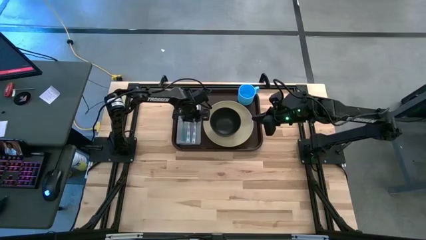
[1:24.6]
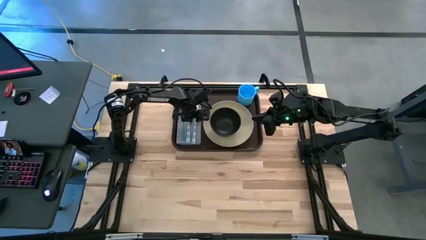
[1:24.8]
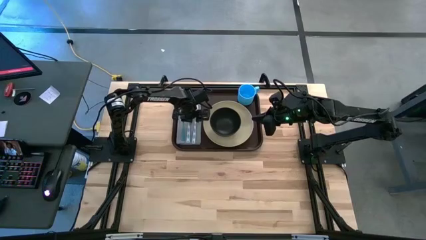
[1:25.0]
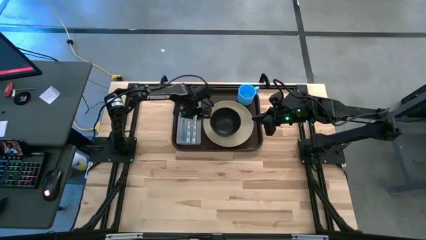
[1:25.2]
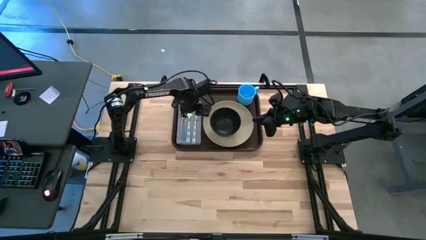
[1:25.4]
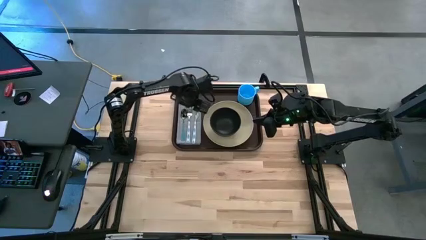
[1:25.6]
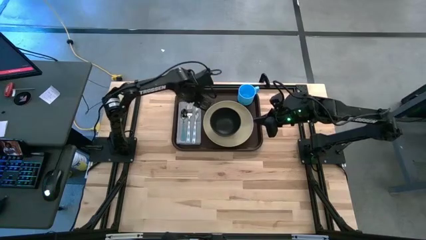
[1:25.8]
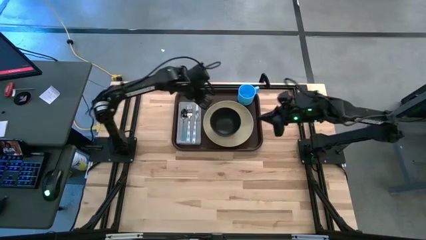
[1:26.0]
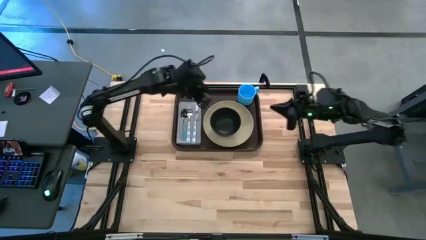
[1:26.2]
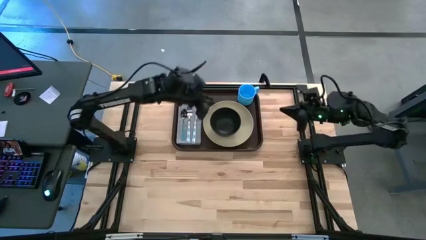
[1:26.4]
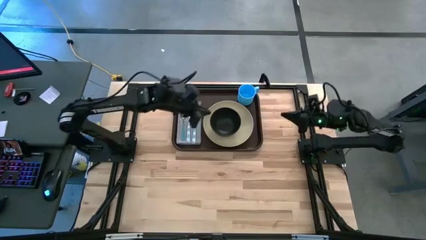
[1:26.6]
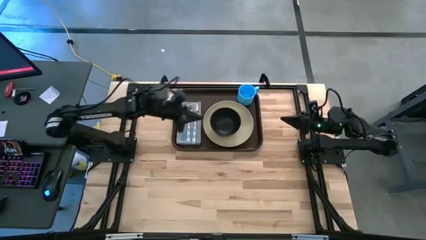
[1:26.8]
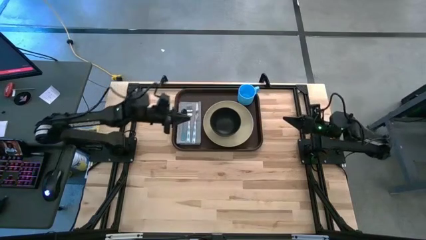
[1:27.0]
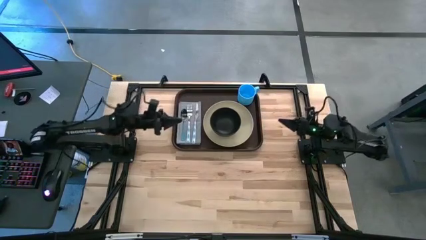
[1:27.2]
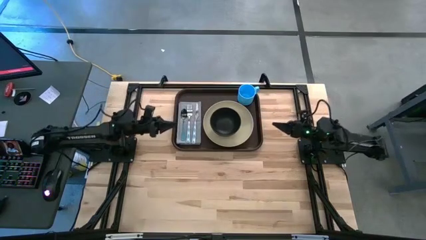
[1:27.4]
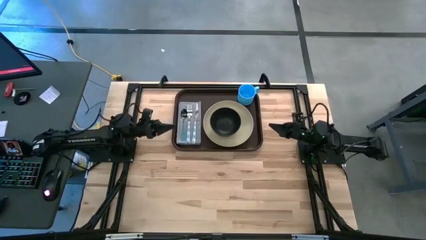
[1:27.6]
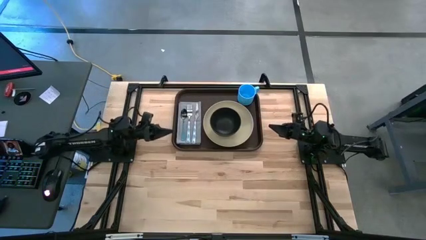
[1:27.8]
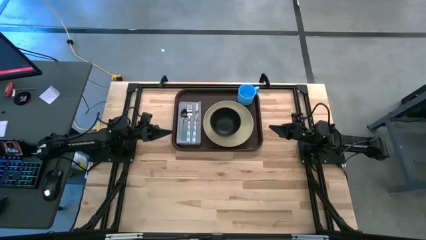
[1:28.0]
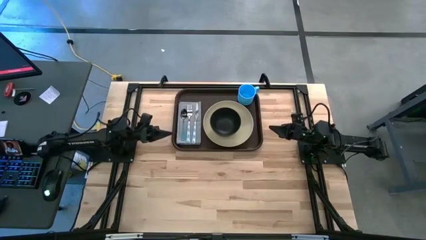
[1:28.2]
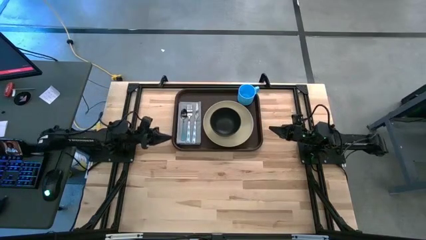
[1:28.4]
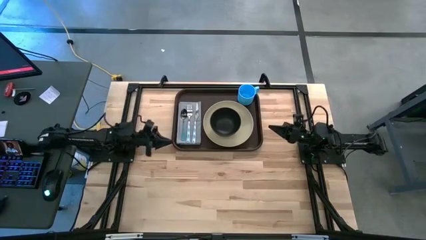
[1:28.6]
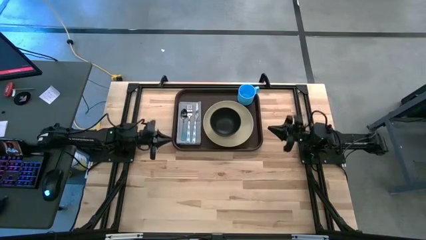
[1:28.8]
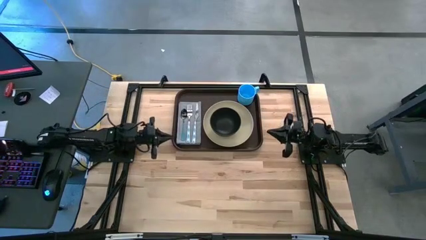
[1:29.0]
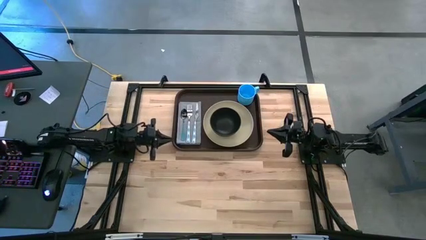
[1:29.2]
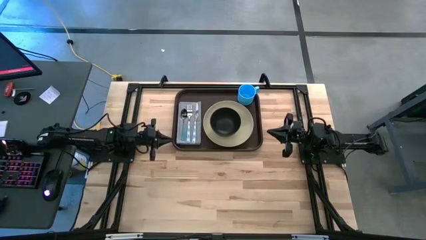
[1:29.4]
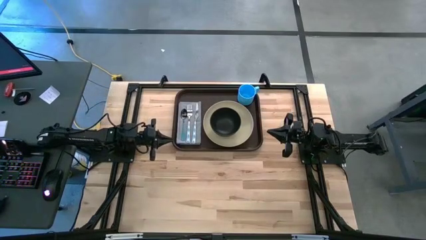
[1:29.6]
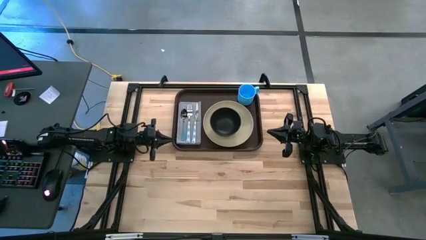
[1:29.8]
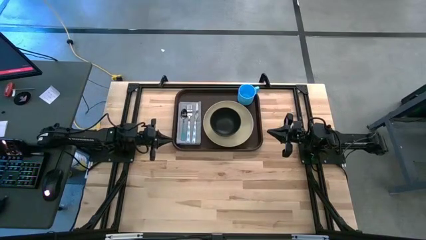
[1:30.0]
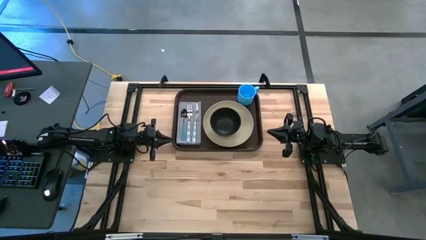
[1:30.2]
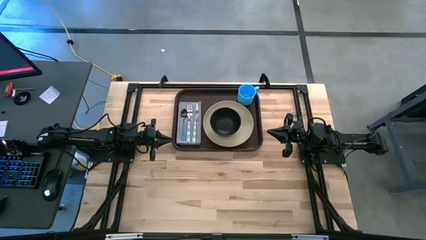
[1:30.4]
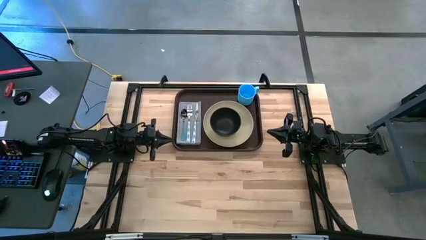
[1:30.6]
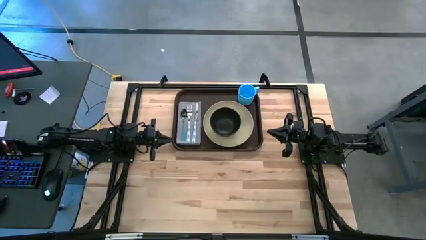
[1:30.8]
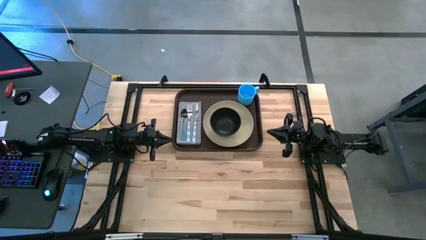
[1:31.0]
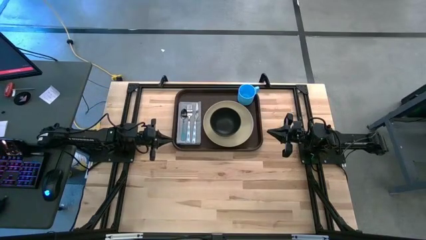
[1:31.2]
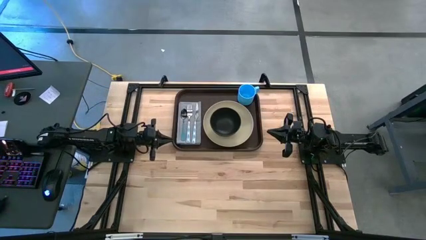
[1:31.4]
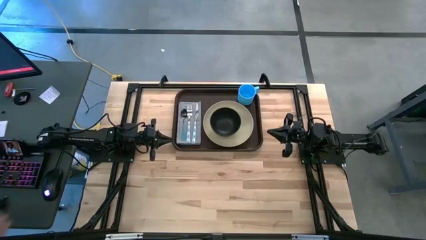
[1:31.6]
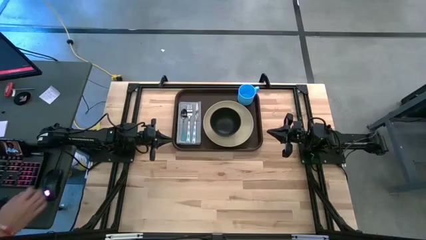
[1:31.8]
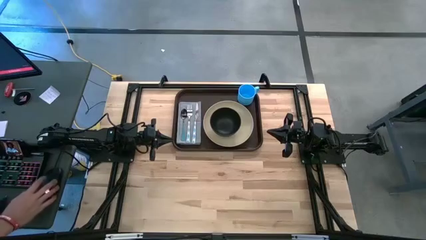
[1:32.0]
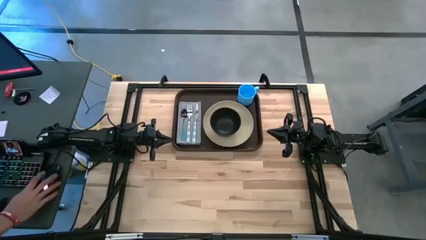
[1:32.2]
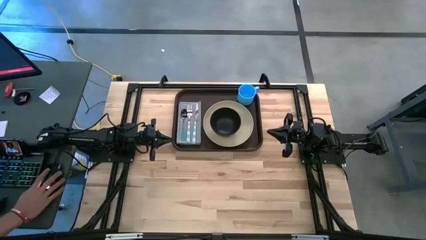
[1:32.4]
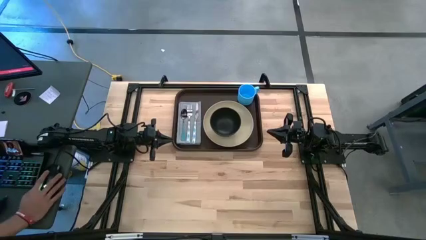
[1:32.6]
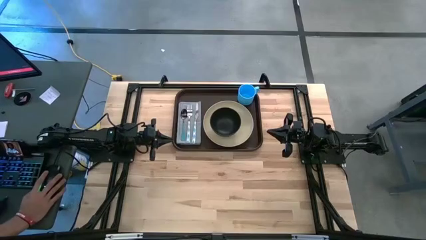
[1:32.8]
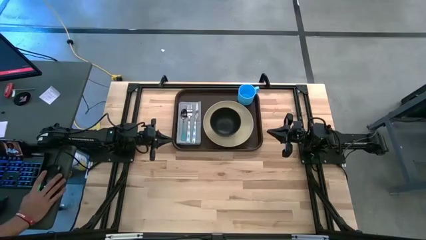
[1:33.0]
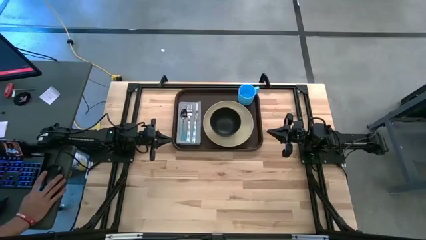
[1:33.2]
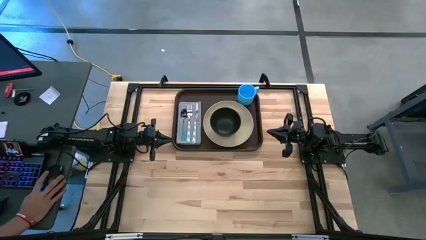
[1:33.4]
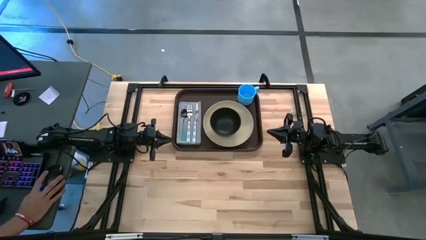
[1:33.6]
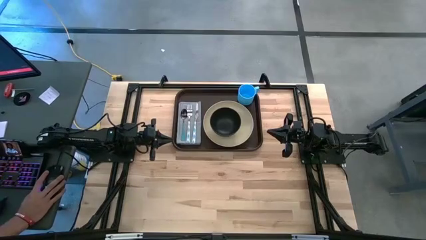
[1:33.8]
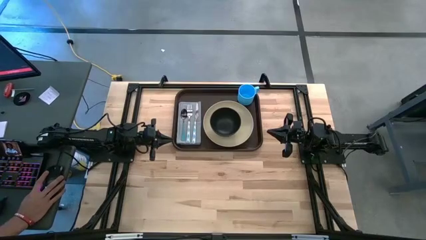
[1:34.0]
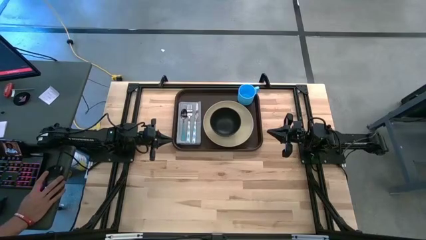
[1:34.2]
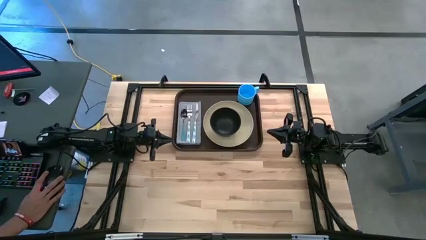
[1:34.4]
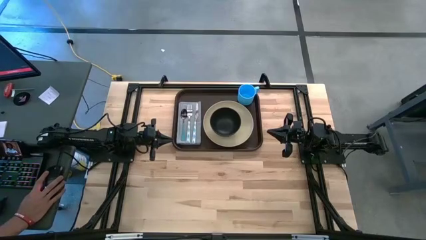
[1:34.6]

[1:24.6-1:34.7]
Task: Set up tray
Return to Home Position

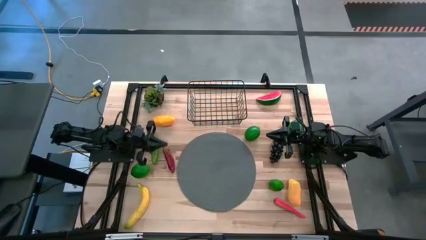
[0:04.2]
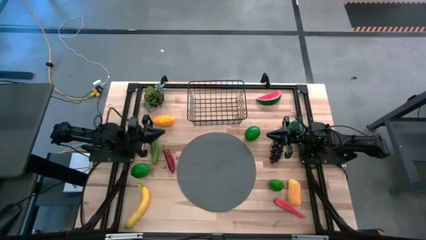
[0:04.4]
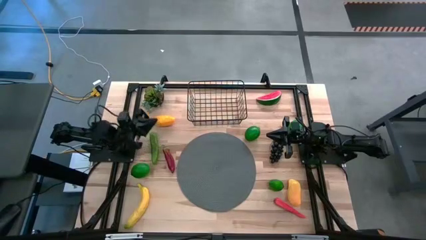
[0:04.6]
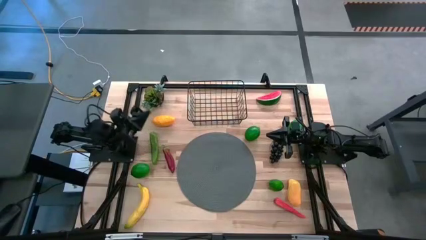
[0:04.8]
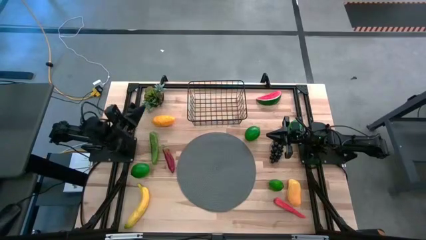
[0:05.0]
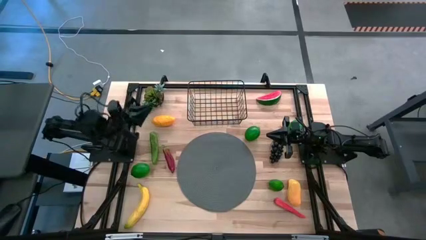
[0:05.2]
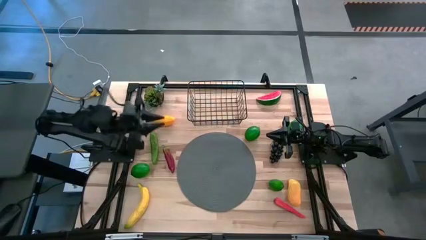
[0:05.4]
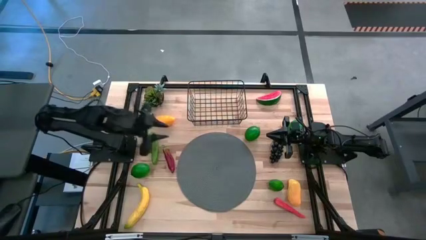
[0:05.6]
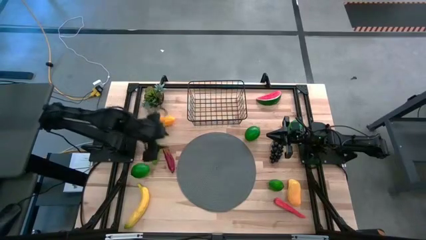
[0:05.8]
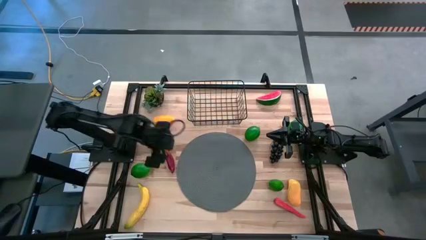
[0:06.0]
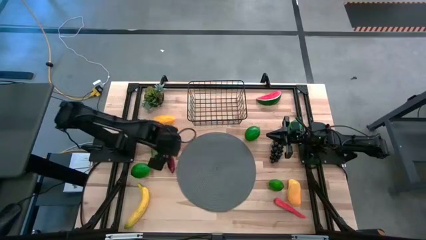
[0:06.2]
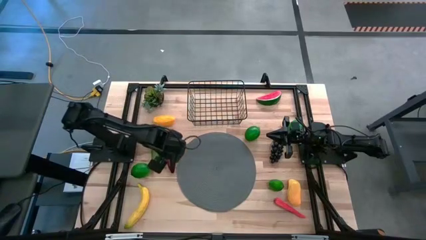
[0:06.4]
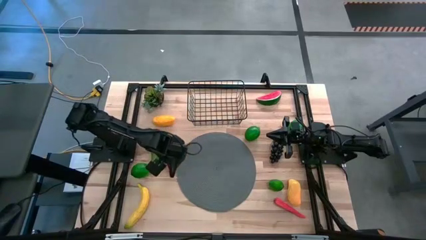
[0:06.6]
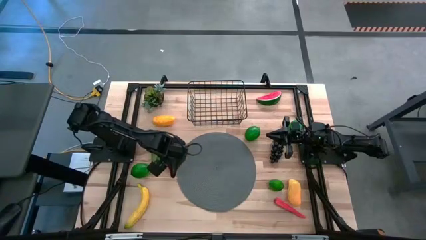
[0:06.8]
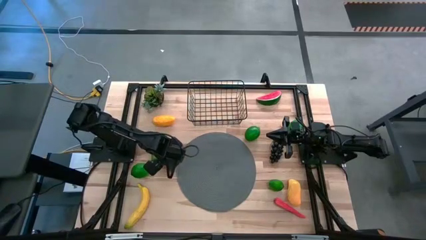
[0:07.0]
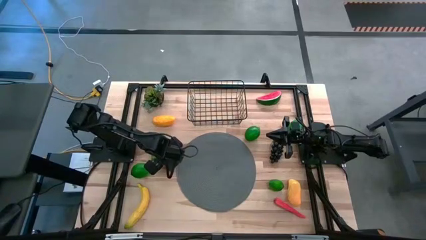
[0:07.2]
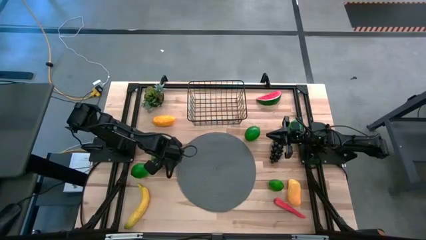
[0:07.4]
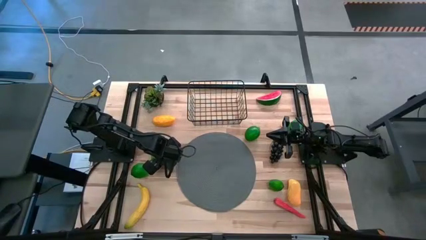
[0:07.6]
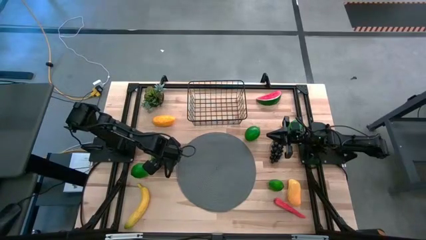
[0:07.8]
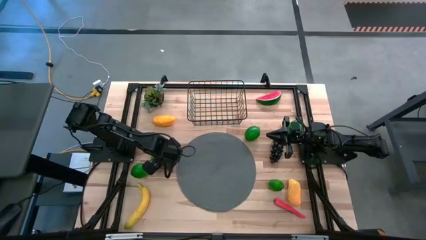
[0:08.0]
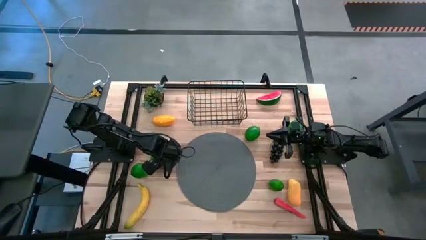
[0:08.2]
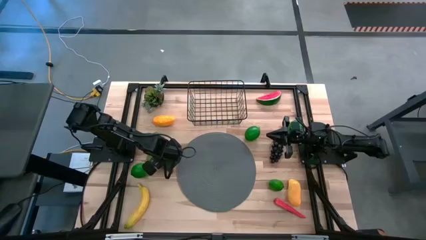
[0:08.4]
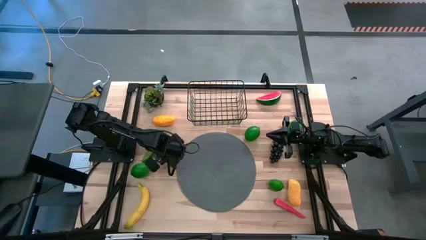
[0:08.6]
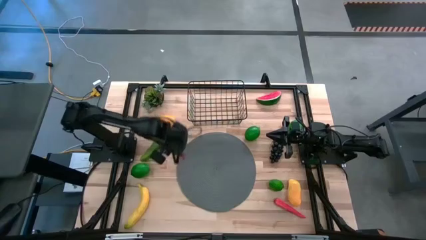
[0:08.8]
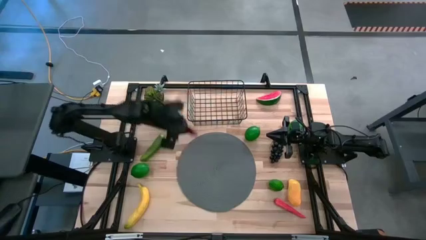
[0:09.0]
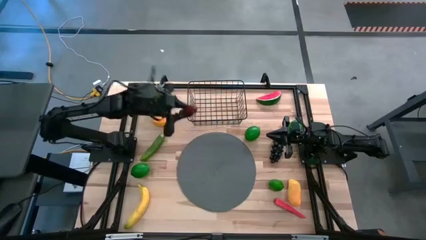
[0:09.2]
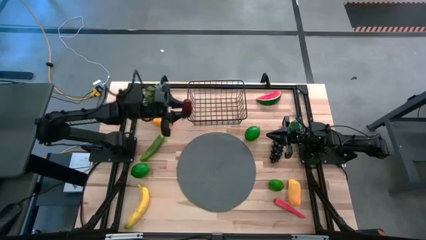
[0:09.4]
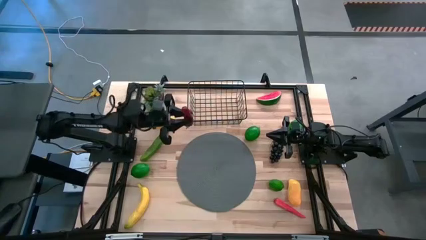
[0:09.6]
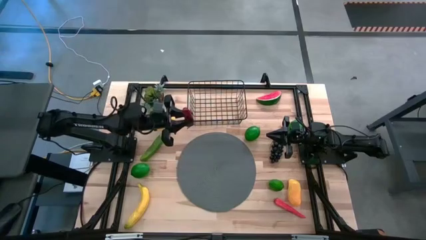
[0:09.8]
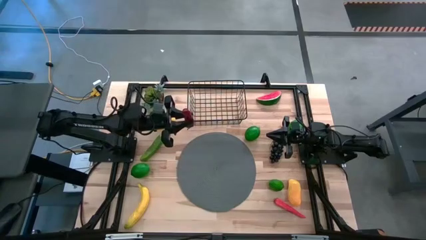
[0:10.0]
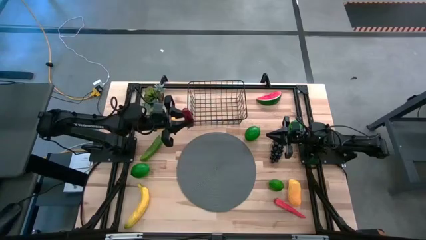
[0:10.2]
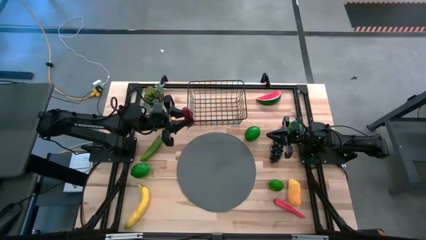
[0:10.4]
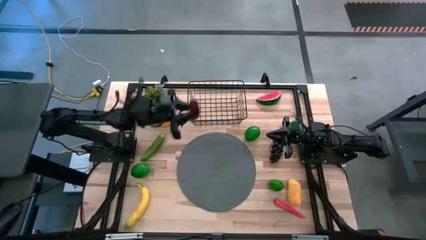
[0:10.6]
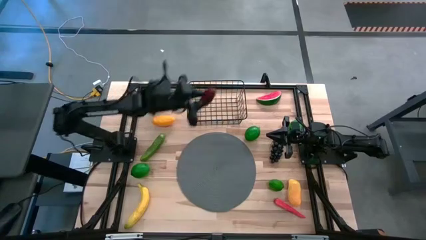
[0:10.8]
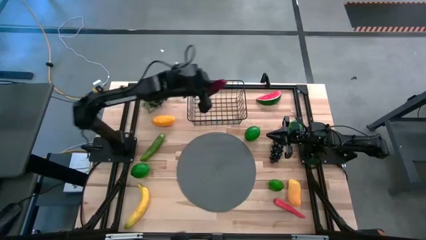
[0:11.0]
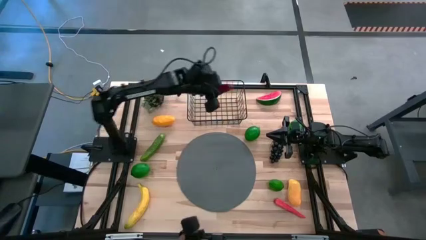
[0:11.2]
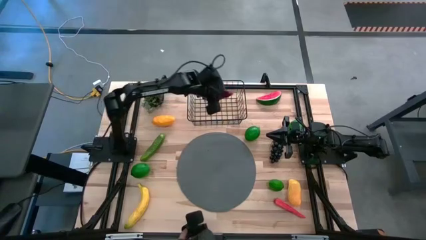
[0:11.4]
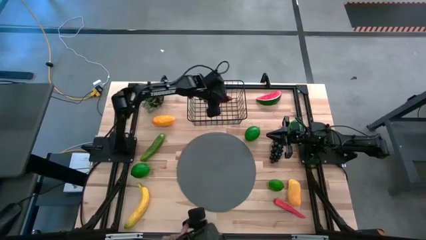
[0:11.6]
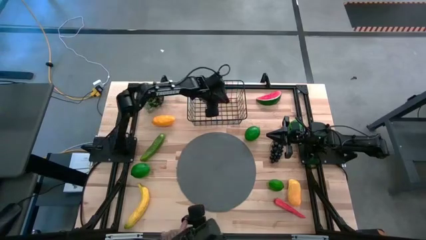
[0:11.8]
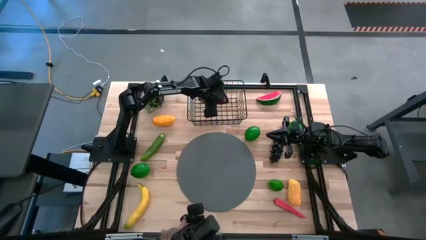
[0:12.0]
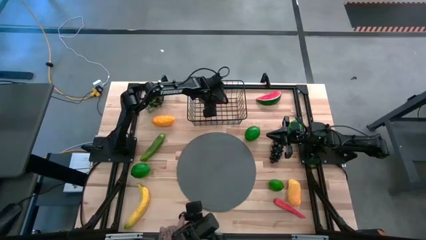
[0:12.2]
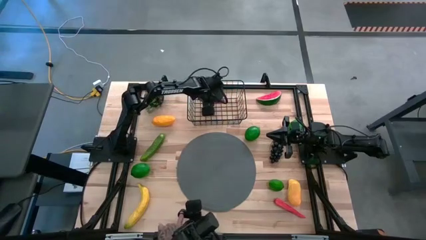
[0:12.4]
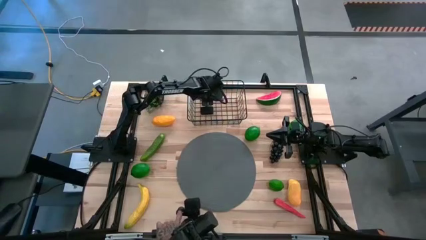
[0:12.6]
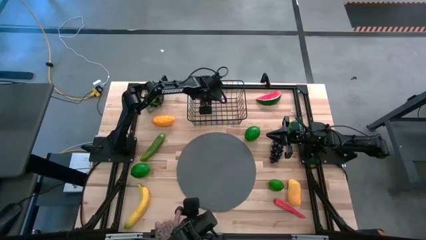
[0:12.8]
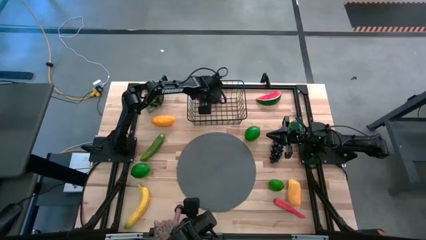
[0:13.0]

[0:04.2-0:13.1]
Task: Build produce basket
Put the red chili pepper into the black wire basket
